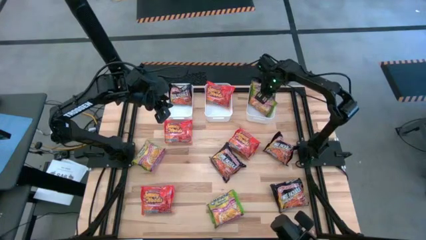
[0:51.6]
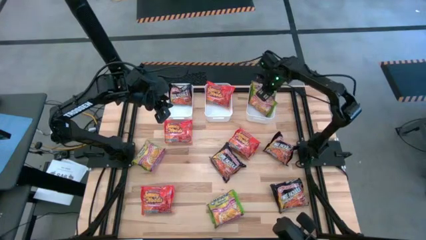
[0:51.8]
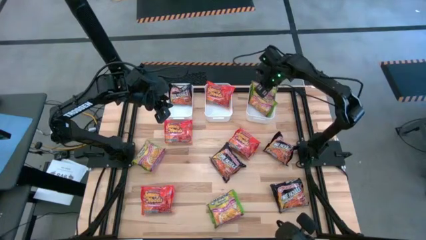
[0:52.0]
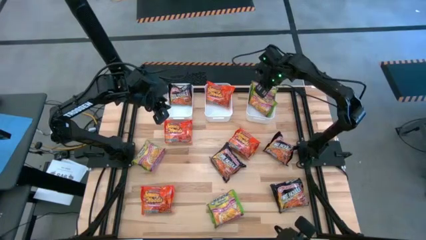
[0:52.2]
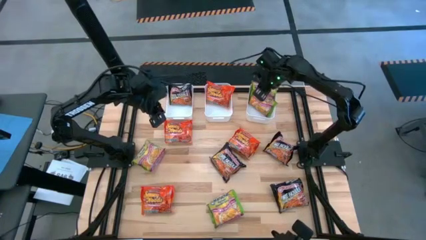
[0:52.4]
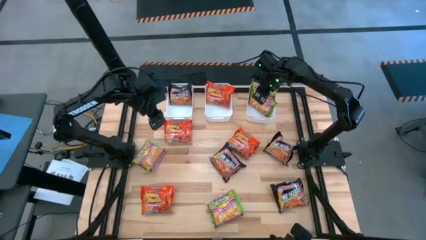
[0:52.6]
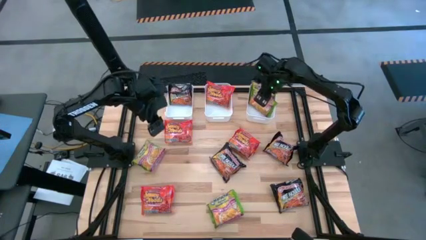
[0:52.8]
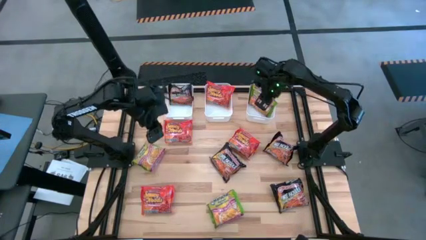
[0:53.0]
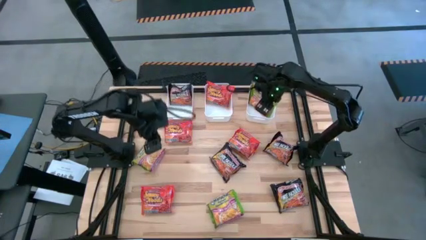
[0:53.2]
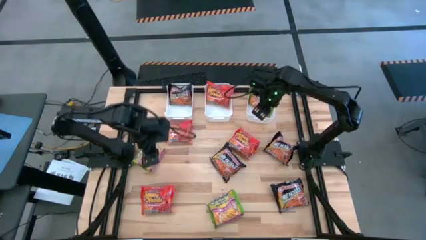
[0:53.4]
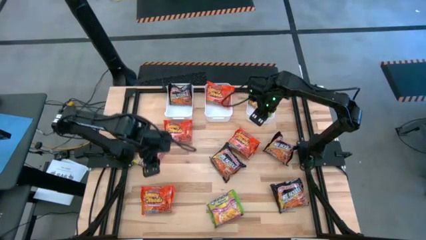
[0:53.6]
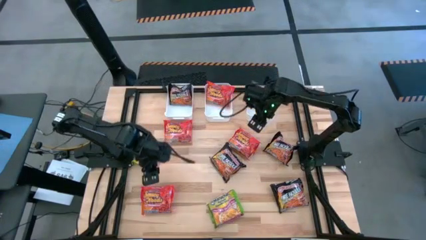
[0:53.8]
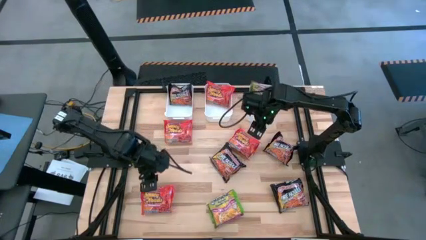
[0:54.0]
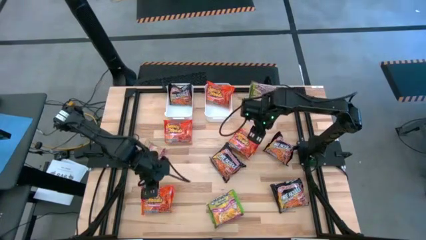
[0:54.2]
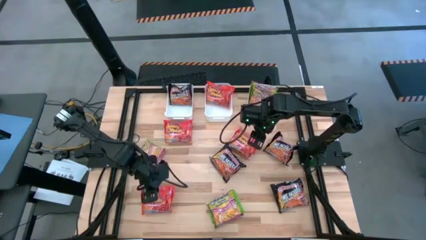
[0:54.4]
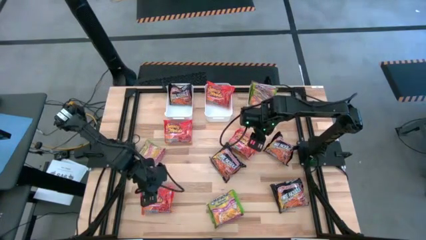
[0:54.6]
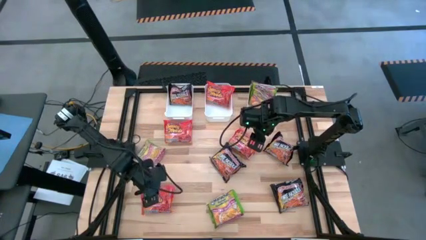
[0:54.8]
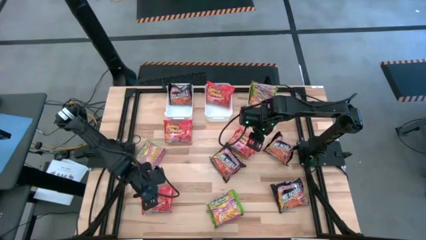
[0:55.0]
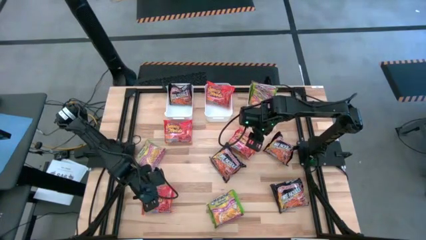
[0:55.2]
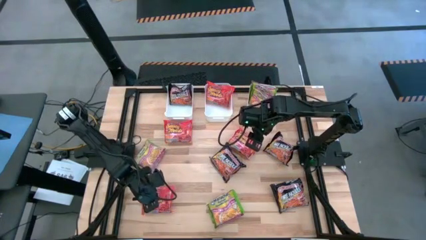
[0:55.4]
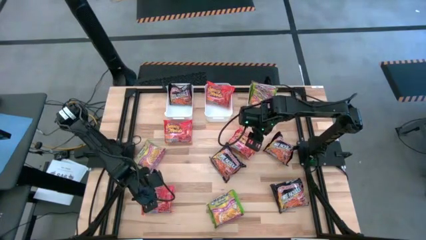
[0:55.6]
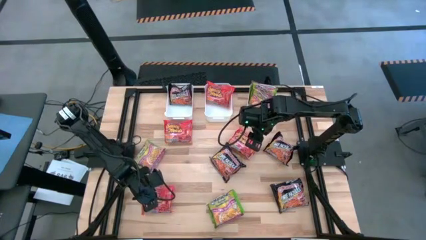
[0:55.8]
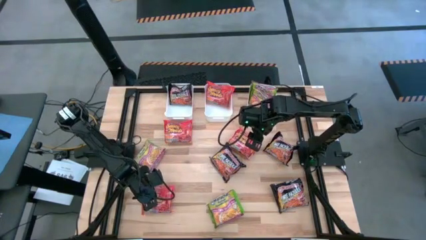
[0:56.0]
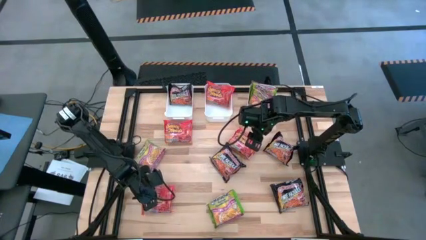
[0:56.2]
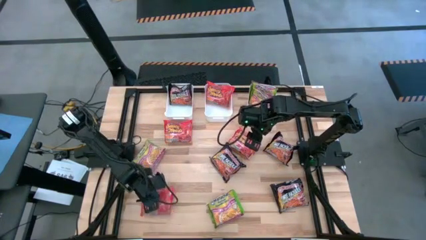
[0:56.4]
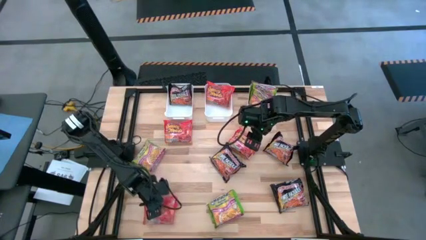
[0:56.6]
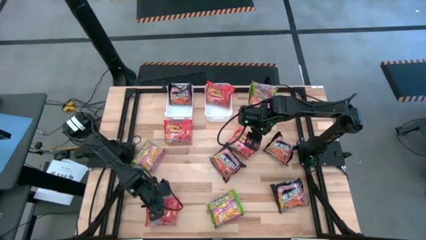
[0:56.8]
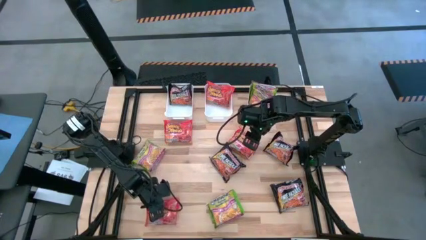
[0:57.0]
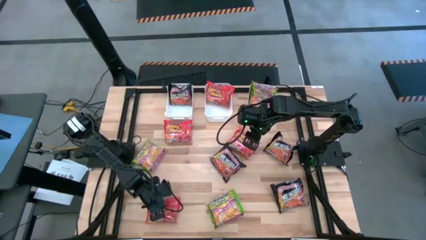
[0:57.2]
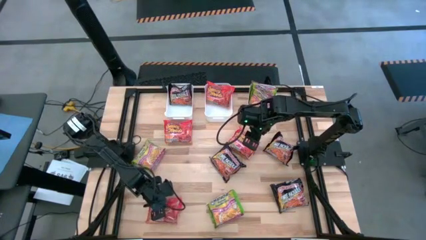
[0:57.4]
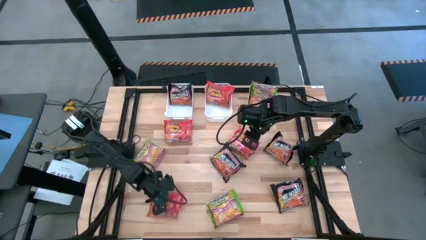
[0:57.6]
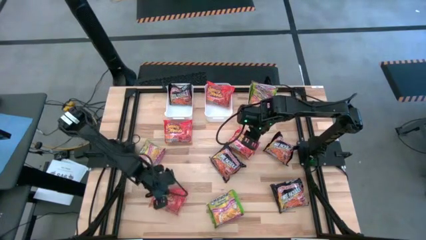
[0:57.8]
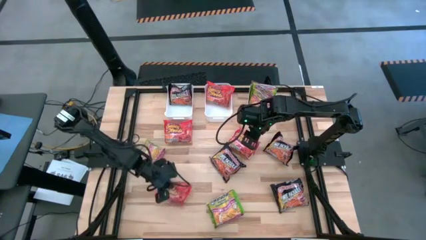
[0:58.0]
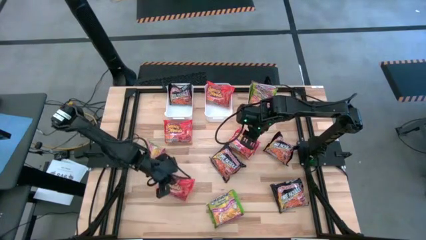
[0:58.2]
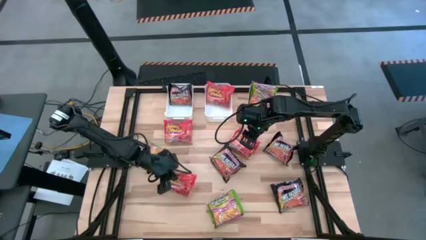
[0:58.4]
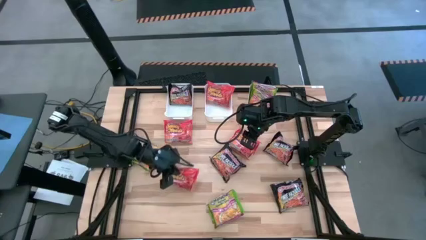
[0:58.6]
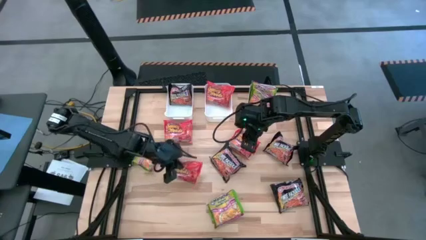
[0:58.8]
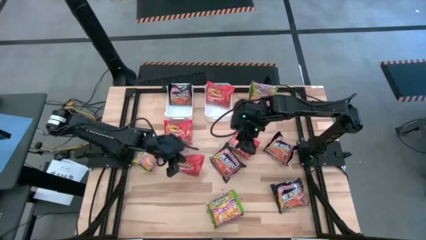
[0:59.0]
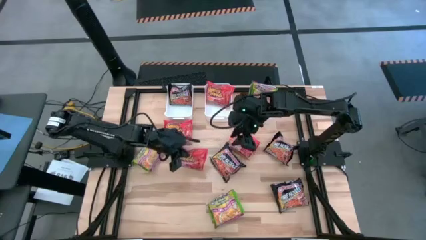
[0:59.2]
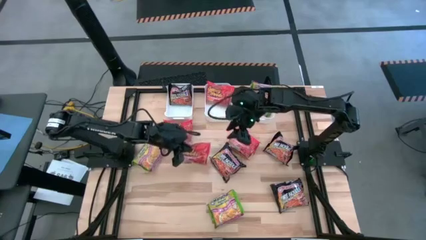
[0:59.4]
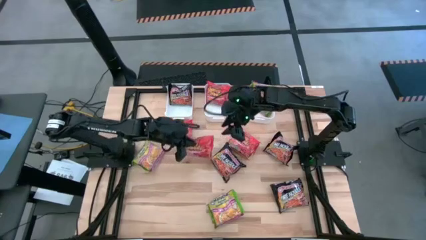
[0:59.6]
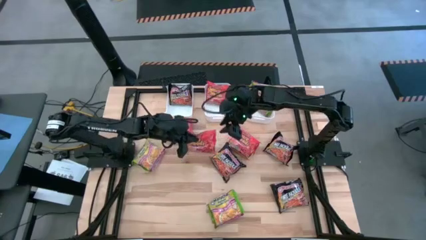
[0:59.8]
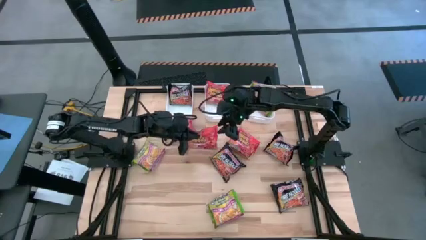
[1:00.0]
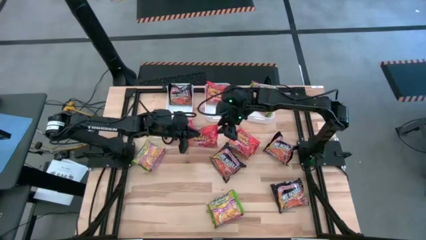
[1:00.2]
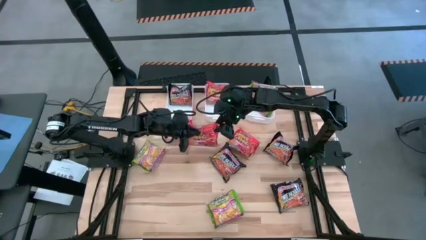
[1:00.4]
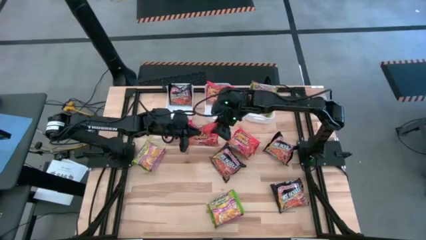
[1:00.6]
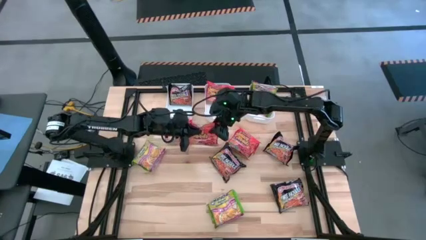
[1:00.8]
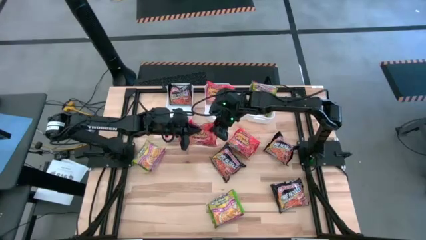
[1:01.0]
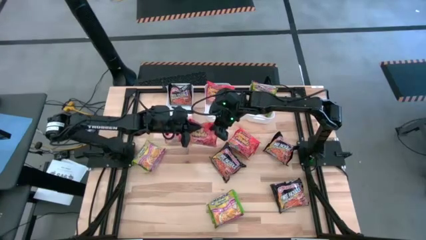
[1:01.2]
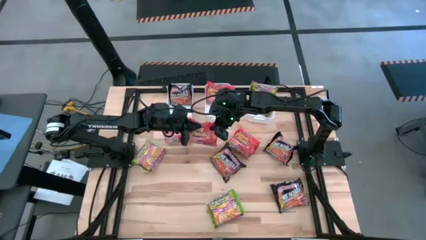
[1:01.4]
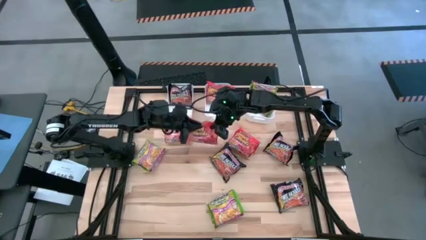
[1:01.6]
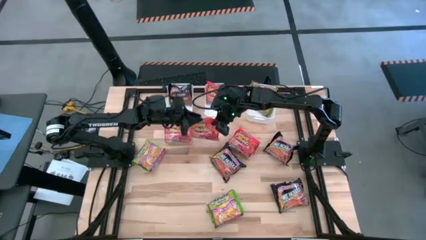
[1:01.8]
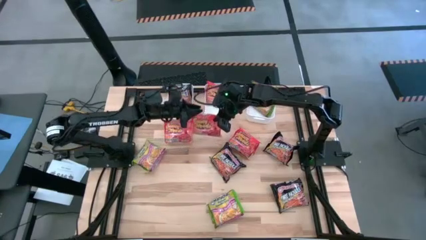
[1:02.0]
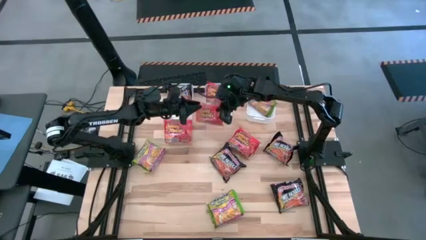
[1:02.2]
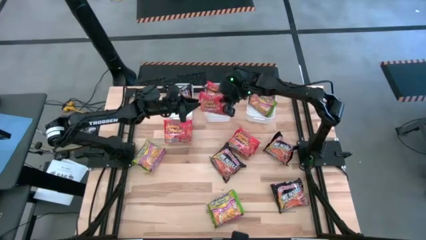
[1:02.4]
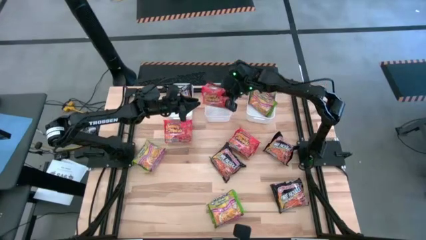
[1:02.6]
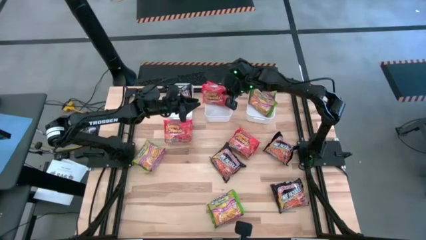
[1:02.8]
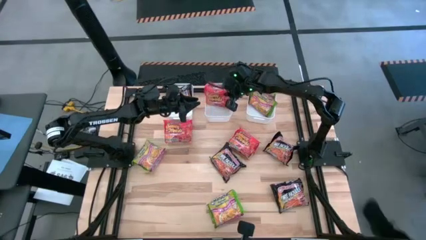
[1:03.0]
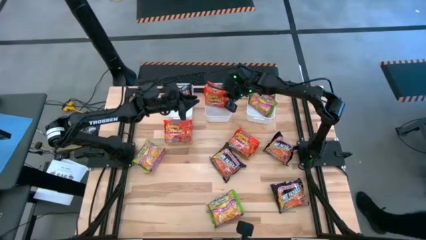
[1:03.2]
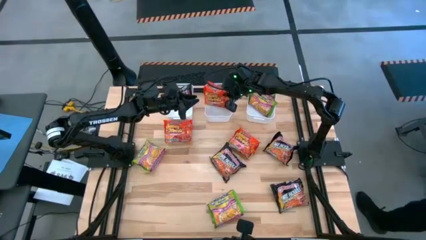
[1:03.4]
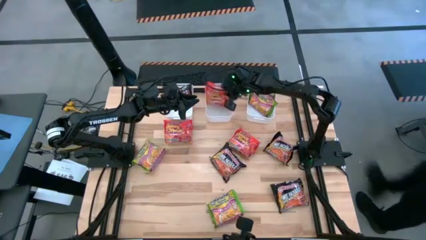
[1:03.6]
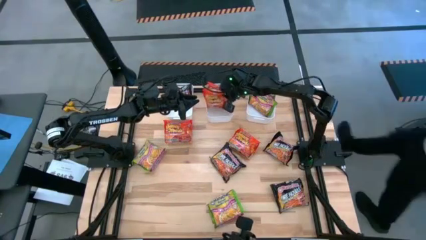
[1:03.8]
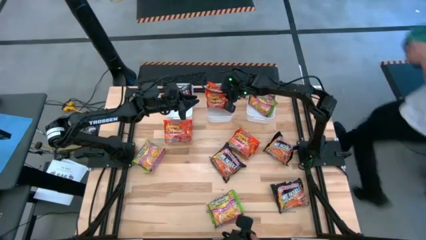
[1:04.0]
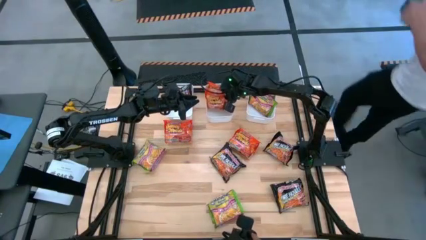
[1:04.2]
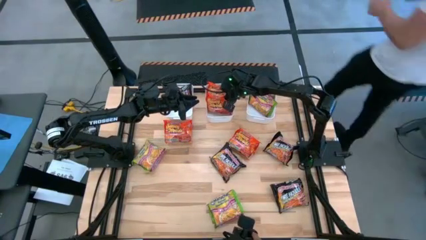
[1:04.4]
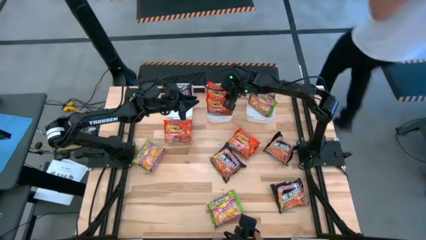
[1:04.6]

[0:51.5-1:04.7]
Task: Sort Maruchan noodles
Put the orange noodle pack into the middle white bin
